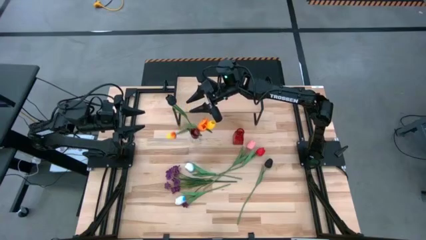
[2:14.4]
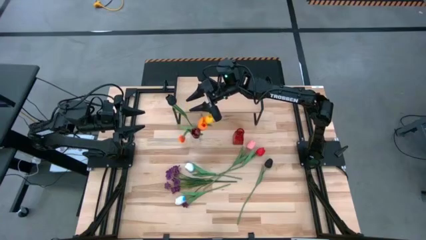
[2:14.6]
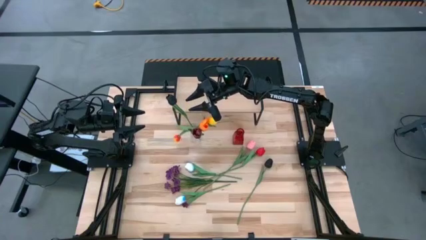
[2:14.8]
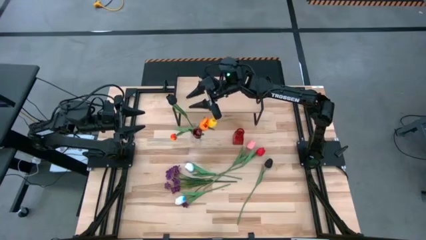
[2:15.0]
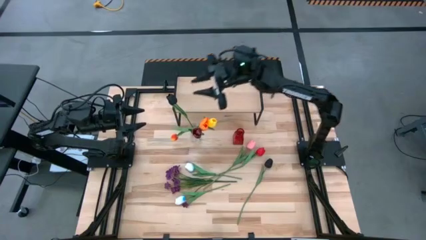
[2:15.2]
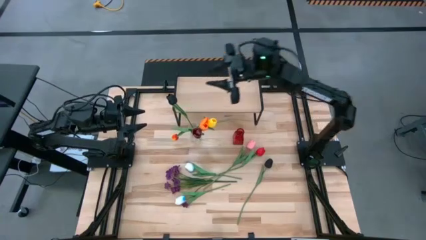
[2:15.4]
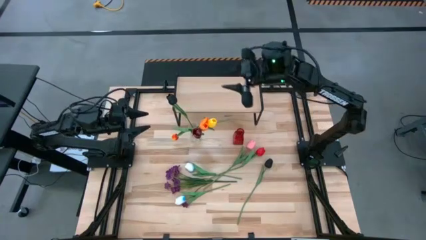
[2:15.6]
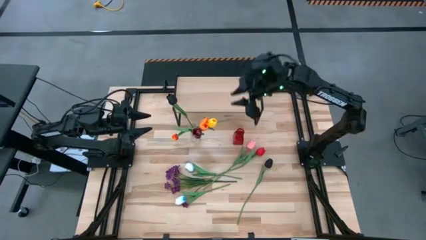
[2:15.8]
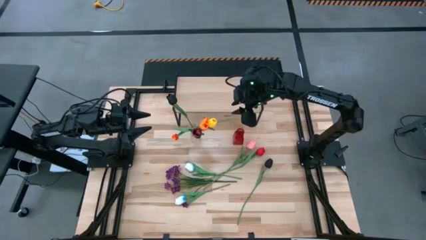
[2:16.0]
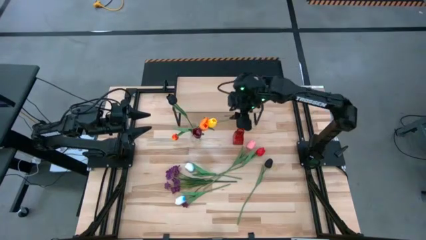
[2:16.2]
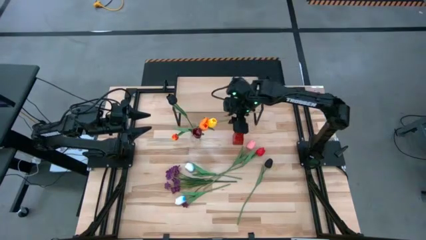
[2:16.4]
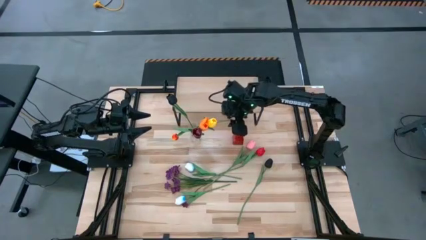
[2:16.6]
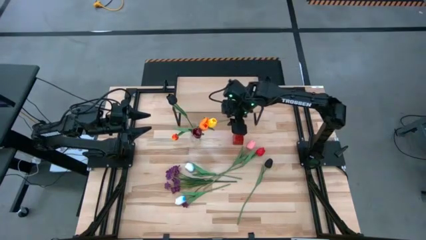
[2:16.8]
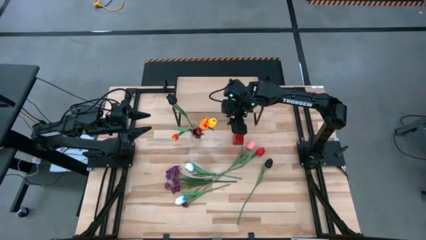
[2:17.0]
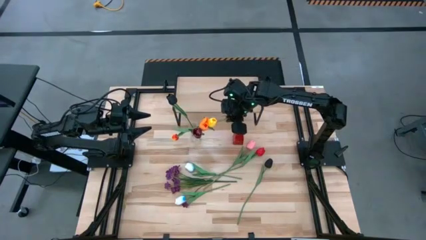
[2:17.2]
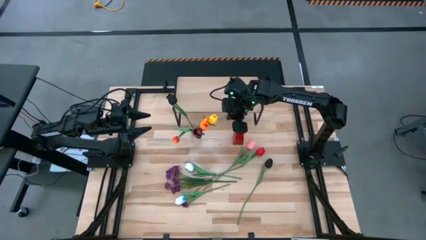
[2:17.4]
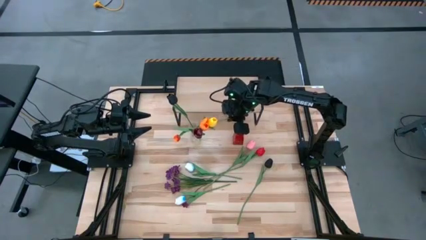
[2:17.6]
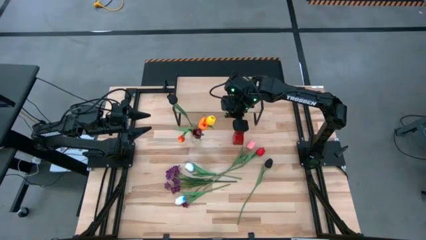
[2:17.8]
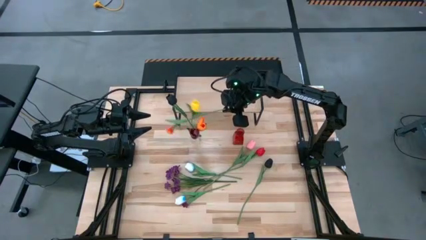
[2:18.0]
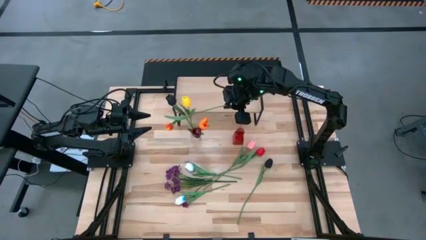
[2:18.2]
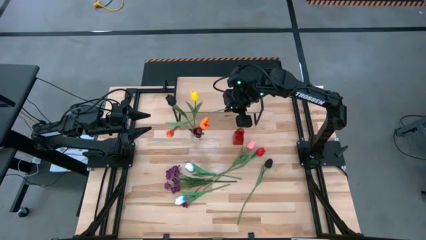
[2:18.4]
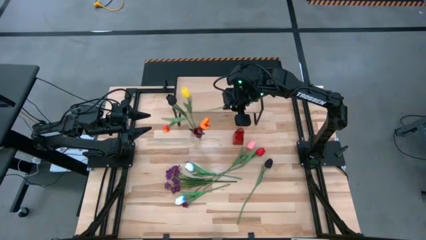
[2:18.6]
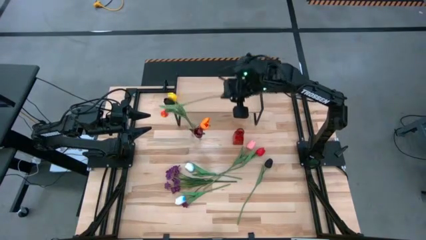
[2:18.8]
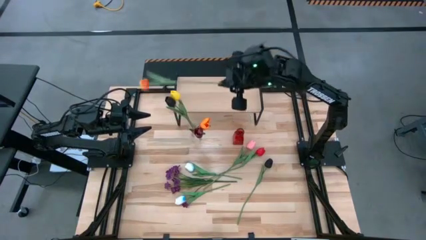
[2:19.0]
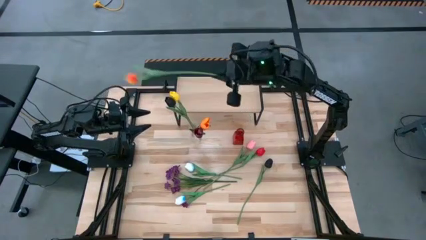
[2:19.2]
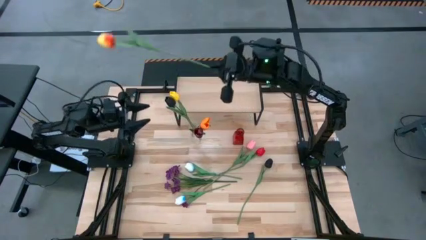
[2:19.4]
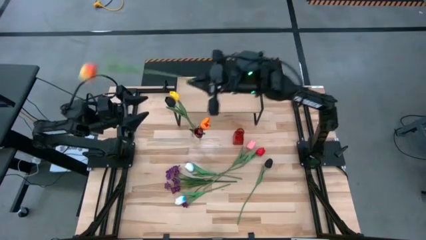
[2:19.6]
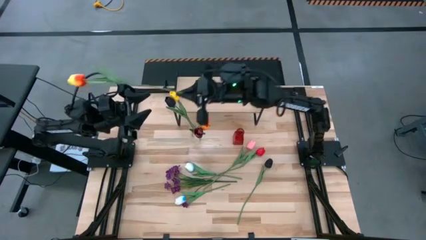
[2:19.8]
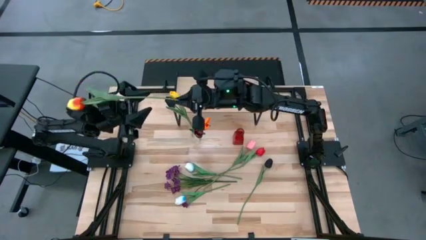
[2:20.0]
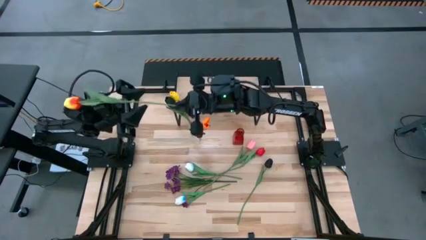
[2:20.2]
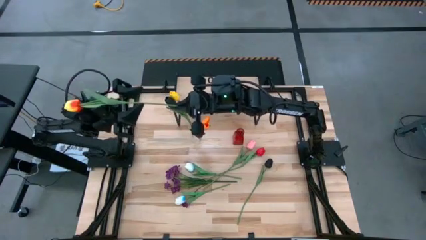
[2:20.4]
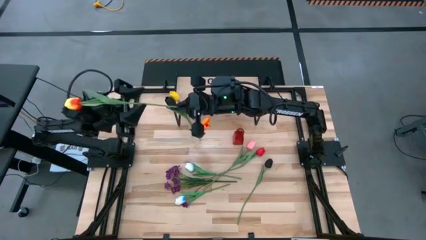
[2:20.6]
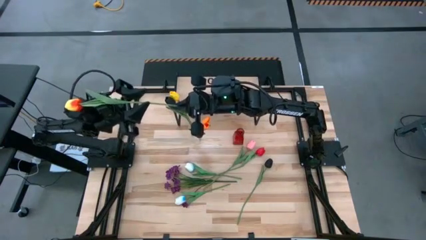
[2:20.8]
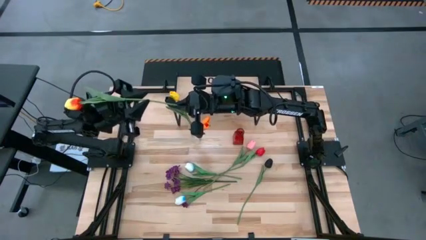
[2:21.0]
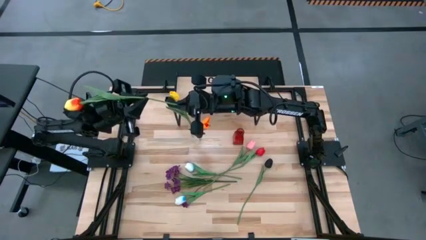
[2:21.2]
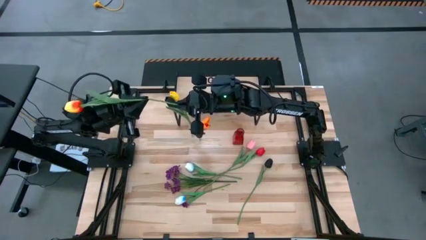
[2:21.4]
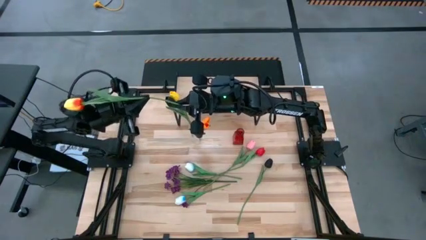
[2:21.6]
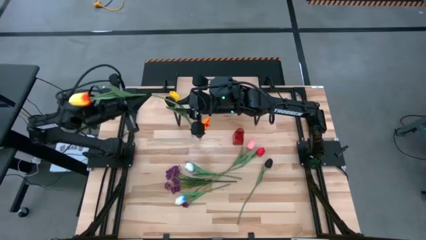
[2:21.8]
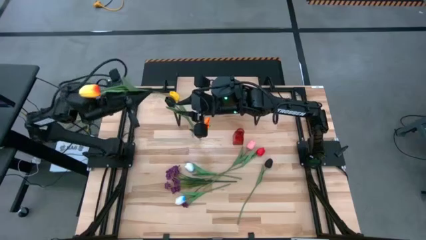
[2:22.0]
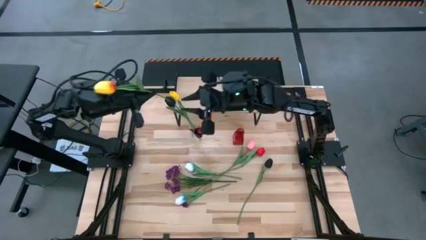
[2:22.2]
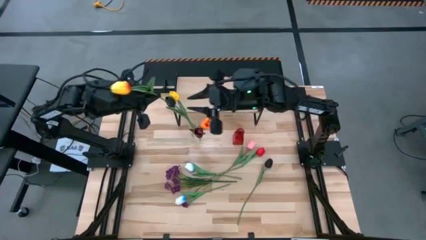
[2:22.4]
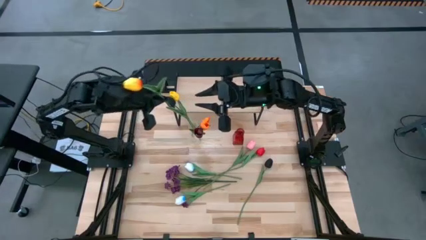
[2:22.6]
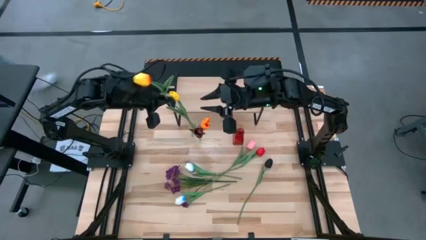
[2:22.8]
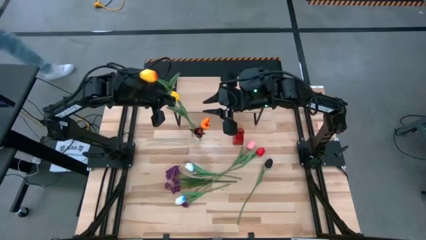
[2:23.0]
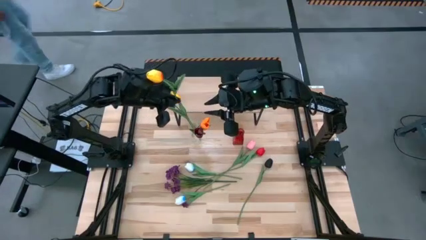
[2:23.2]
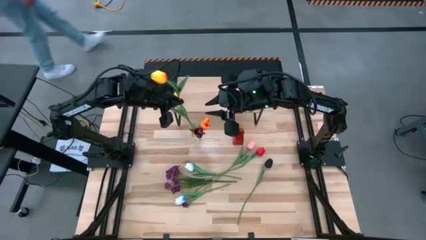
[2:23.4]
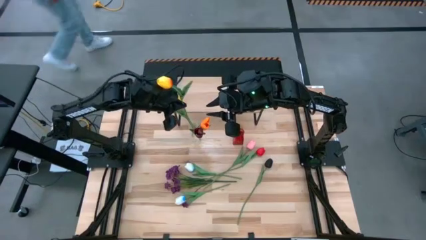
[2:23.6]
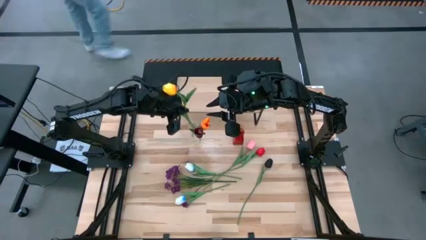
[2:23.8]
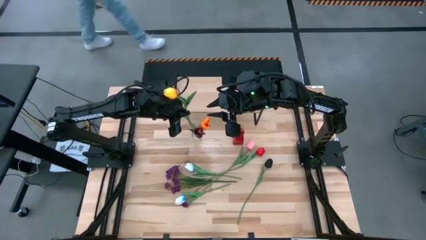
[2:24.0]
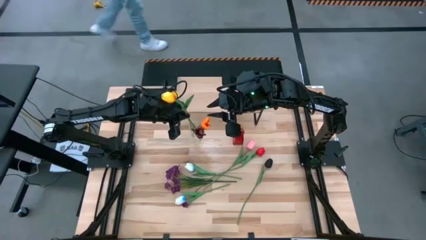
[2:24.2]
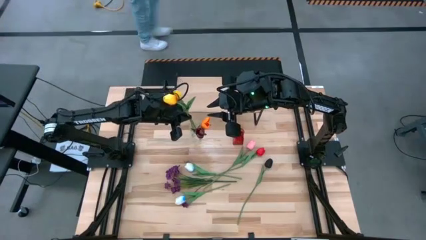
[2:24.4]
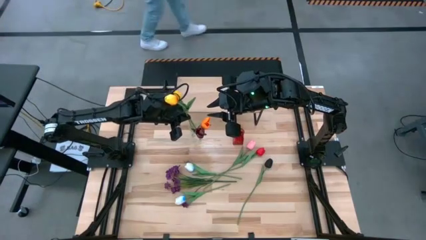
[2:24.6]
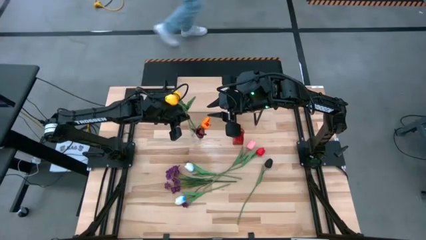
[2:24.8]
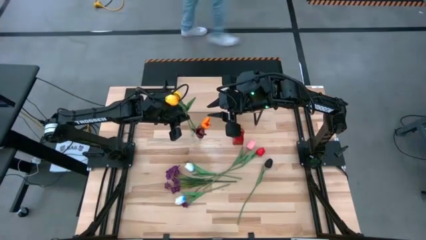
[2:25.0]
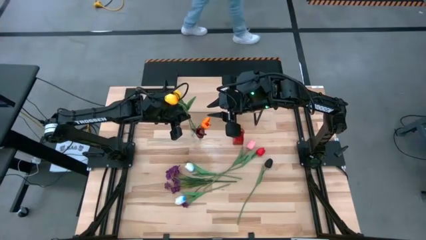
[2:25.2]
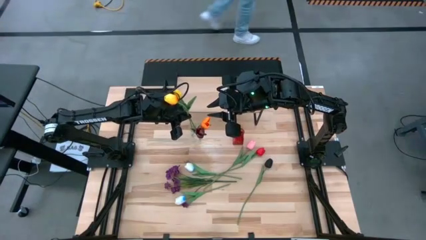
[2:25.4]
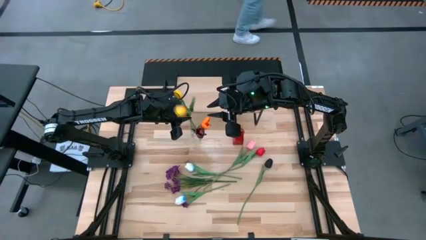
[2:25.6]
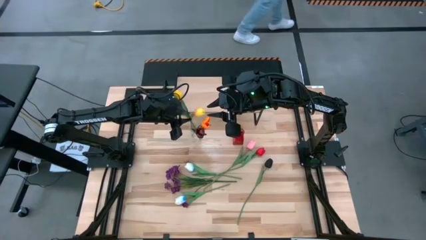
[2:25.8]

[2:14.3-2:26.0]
Task: Pick and place flowers into a vace then onto a shelf
Put the yellow tulip into the transparent vase

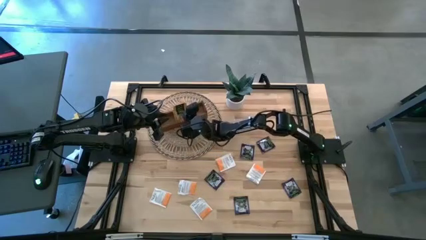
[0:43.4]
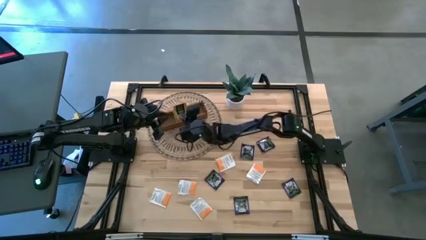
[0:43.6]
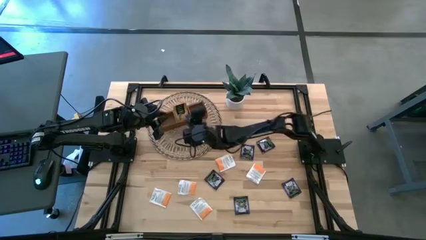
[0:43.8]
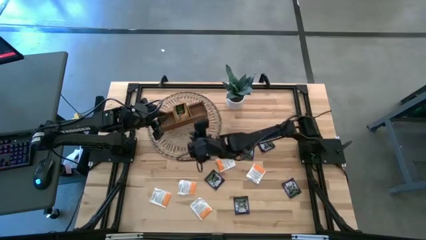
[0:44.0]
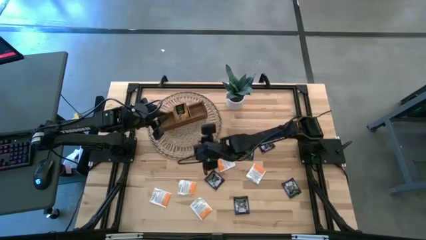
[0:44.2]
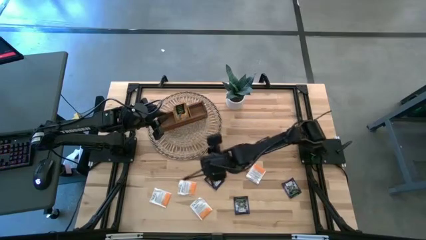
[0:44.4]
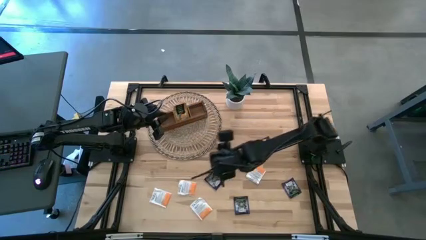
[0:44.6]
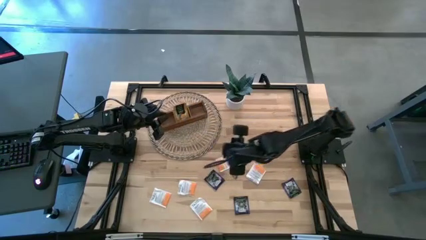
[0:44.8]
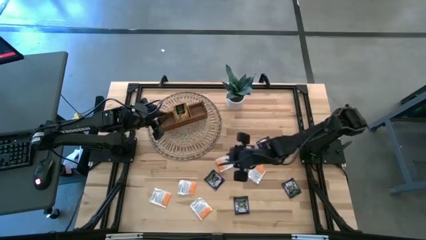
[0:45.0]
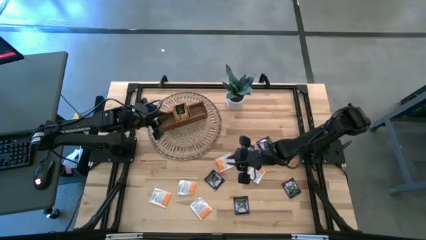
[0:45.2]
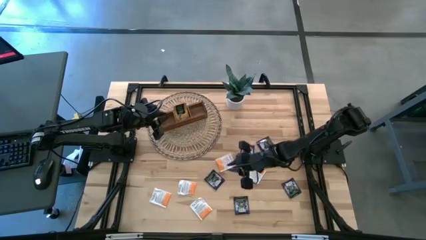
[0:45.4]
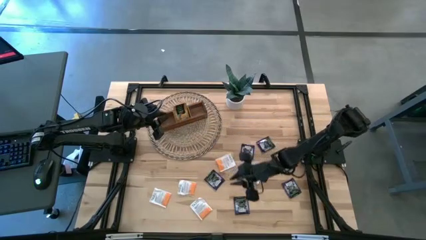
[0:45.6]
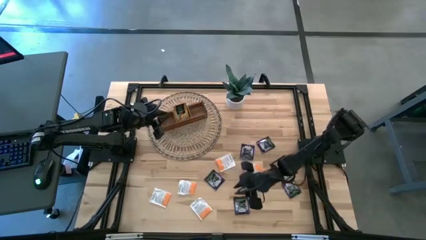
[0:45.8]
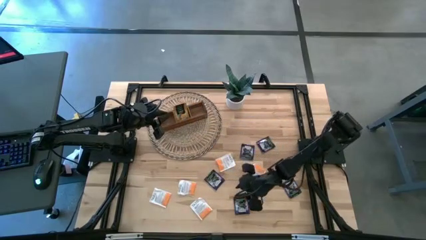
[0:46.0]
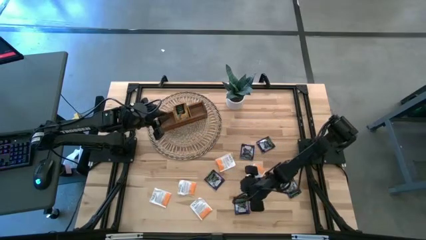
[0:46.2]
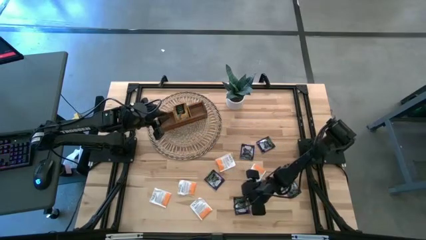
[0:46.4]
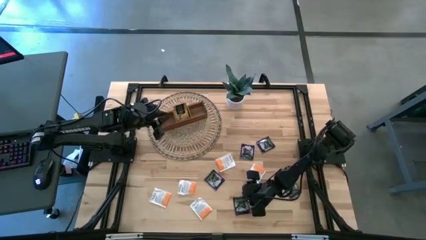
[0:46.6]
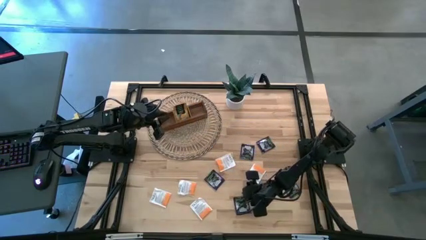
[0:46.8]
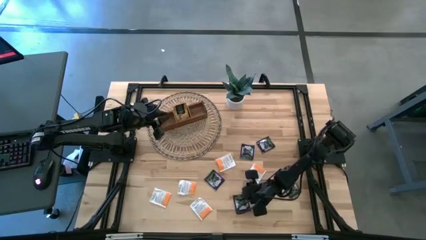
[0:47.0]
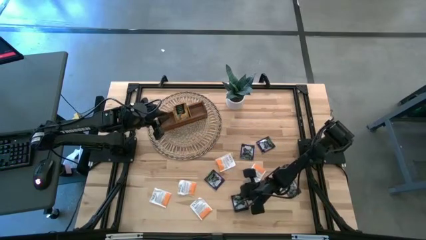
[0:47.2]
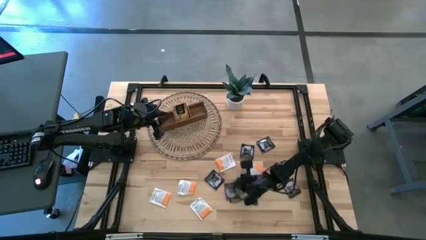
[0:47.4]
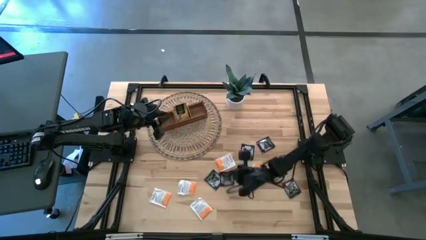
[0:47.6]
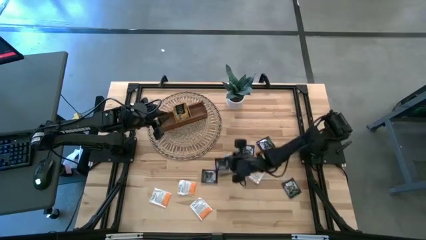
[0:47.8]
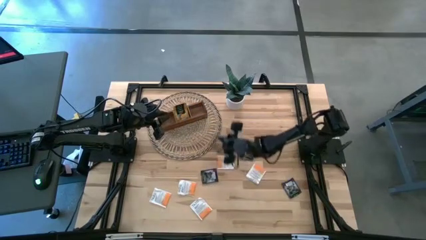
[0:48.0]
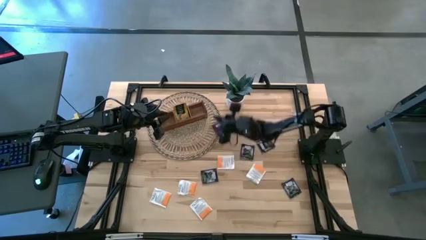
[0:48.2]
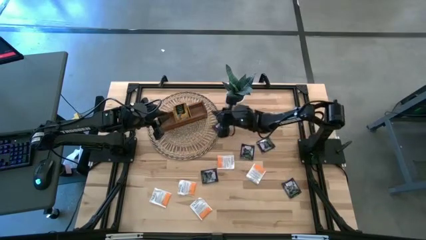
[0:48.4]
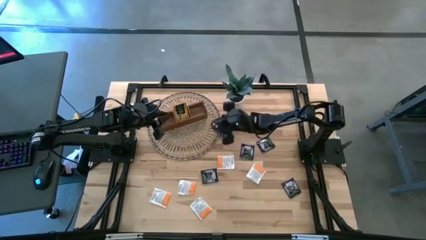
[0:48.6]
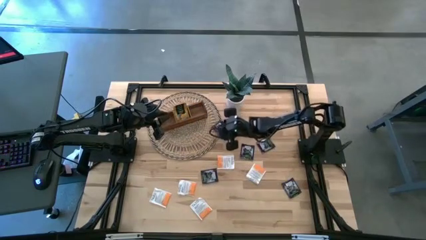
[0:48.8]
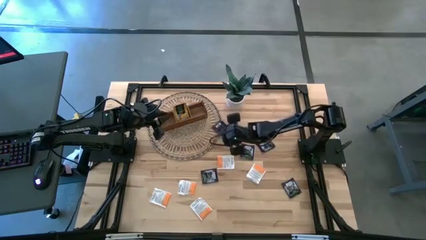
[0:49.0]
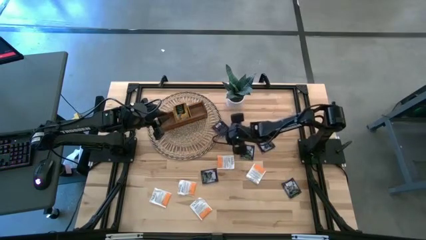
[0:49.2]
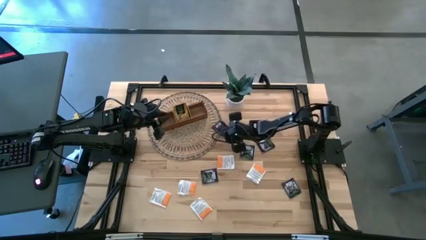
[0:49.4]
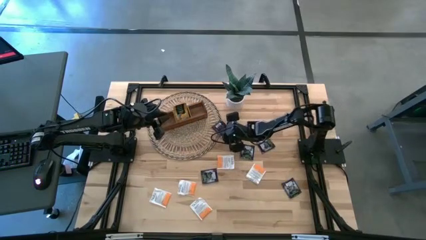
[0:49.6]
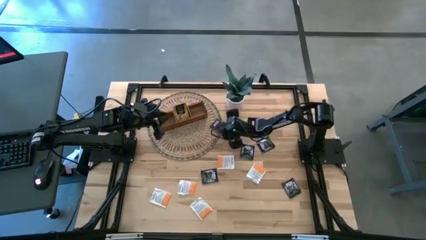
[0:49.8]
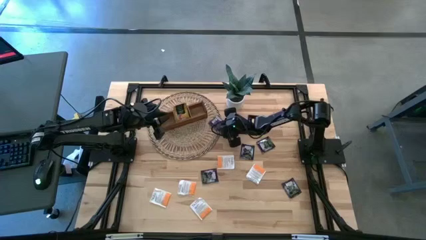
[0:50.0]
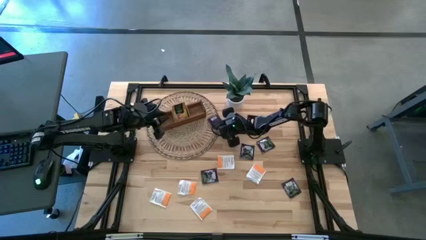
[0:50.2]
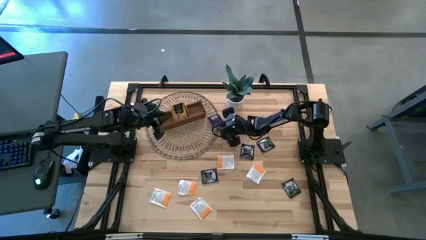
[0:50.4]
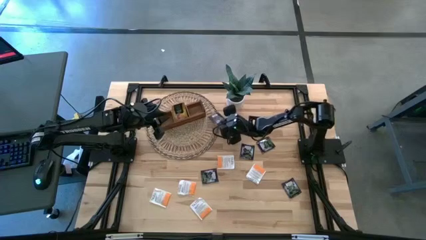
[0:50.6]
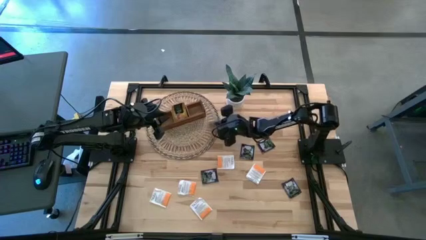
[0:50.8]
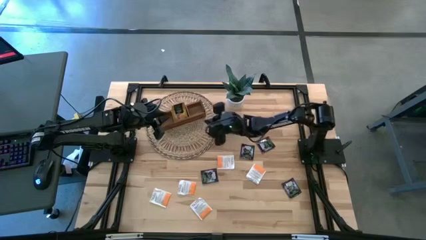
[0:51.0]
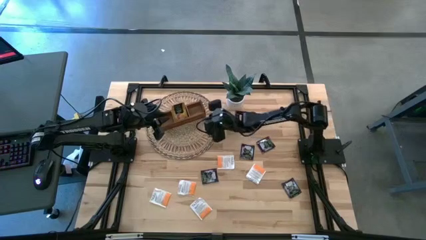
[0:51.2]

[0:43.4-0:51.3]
Task: Pick & Place Tea
Put the black tea bag into the right section of the wooden organizer
